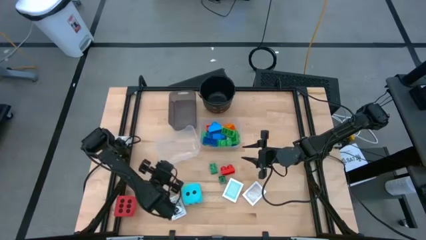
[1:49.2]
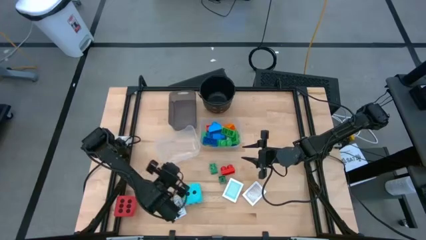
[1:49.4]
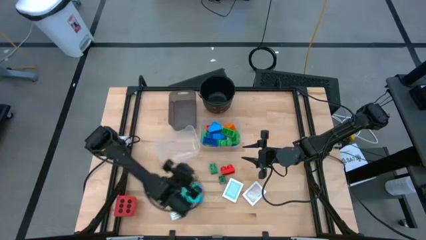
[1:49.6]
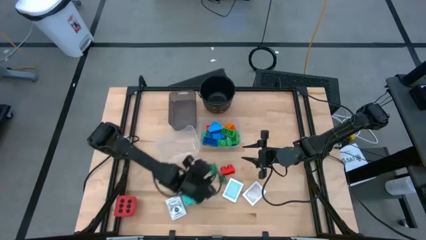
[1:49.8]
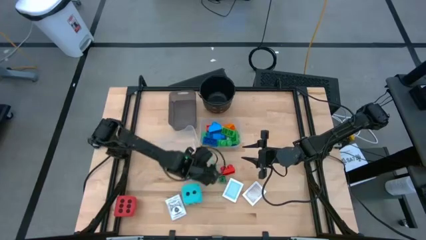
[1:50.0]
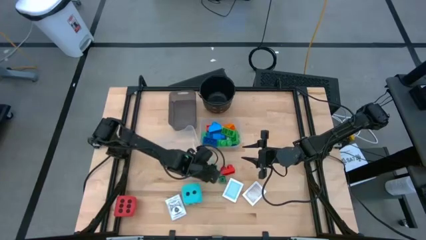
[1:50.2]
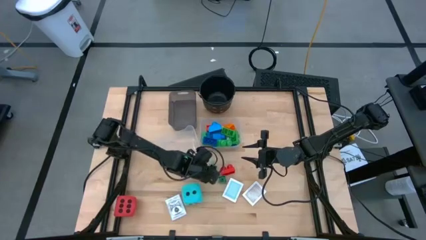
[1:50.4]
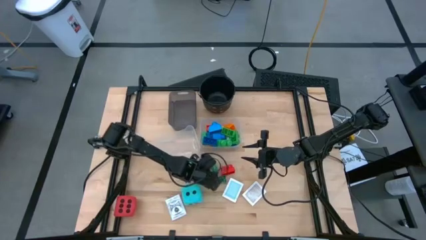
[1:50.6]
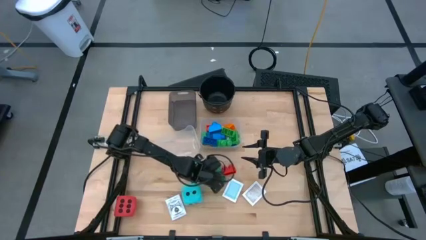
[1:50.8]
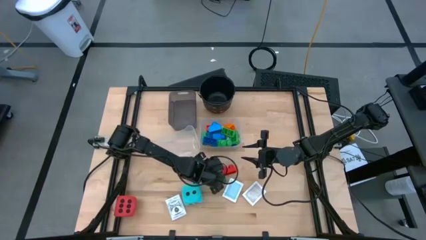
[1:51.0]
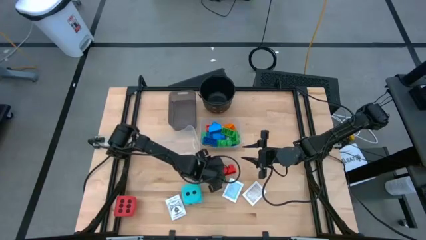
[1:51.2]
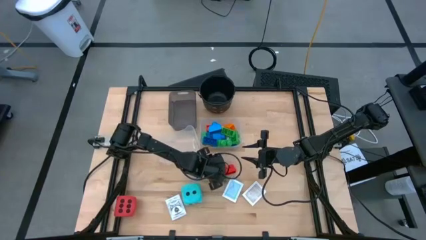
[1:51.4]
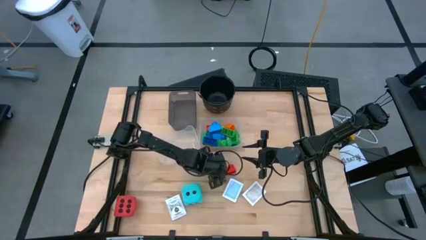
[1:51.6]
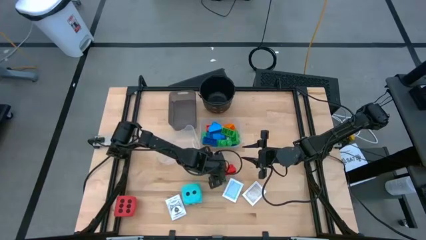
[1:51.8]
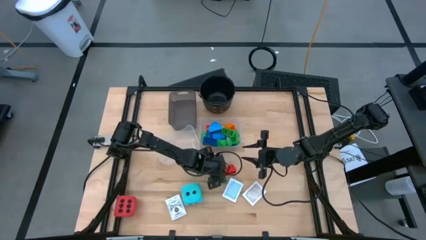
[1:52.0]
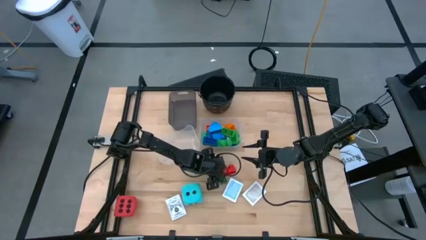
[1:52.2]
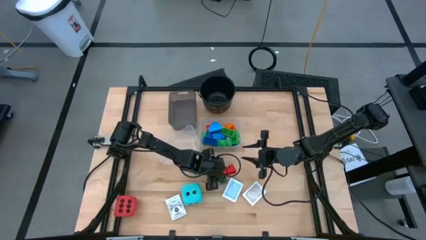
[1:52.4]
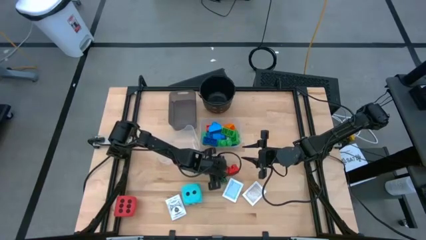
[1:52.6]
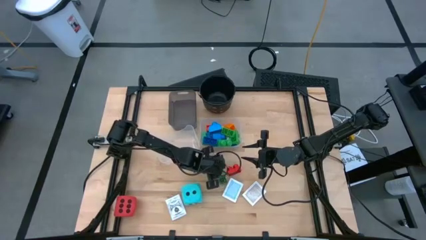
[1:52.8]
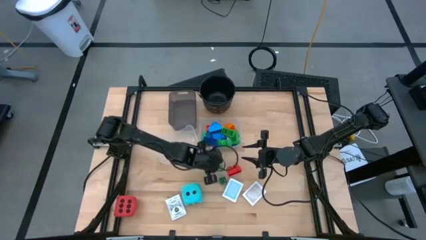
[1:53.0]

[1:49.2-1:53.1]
Task: Pick & Place Toys
Put the green game piece into the right transparent bin

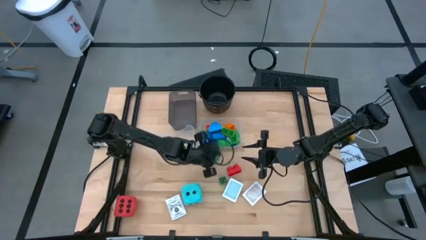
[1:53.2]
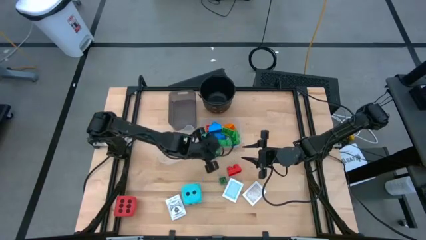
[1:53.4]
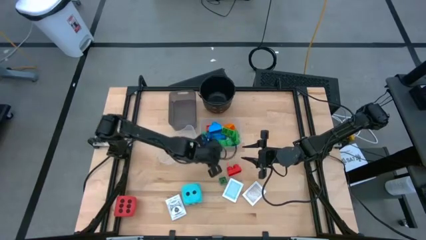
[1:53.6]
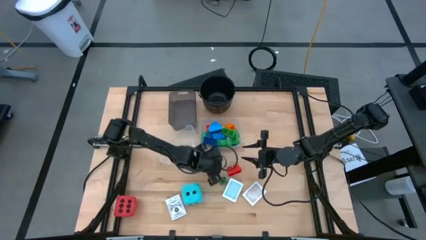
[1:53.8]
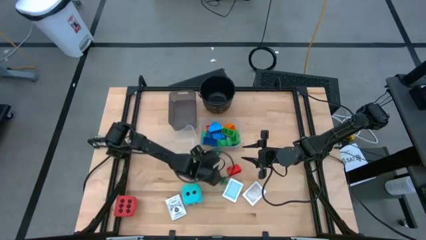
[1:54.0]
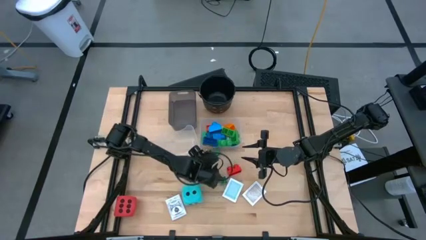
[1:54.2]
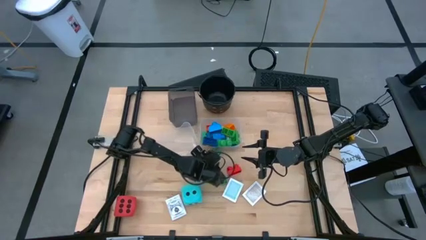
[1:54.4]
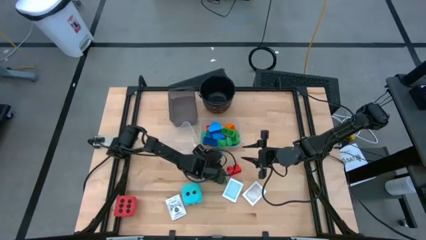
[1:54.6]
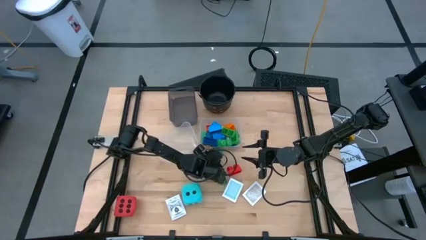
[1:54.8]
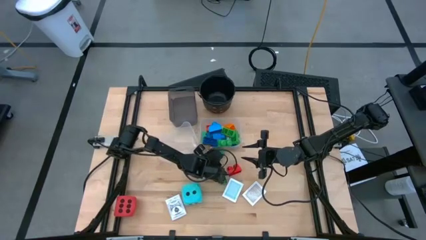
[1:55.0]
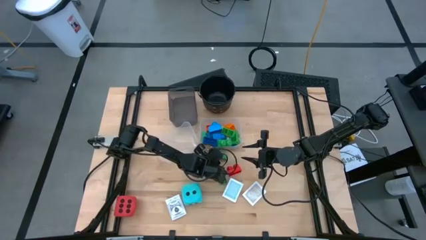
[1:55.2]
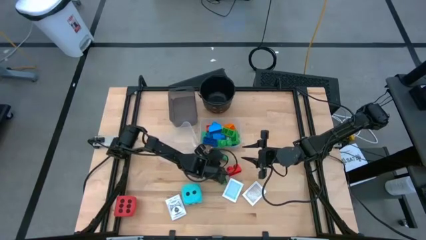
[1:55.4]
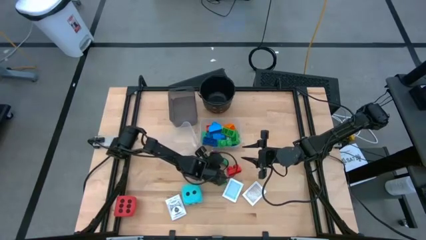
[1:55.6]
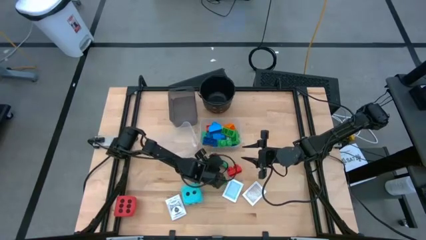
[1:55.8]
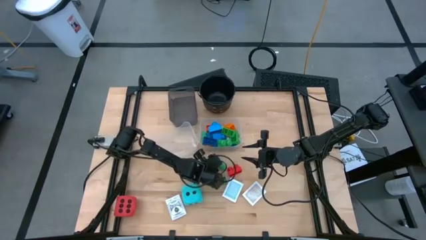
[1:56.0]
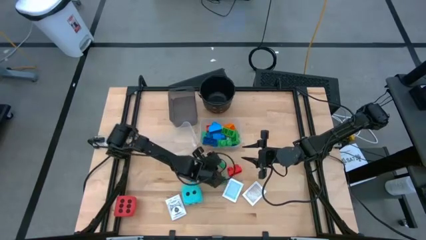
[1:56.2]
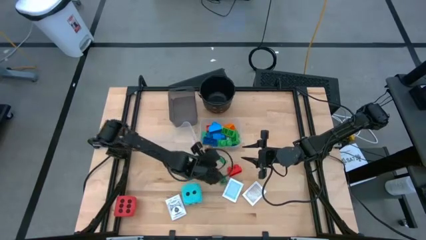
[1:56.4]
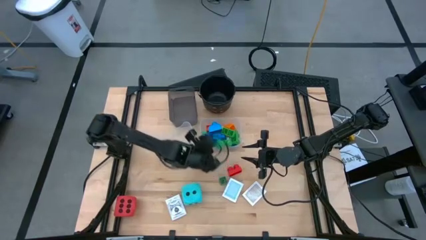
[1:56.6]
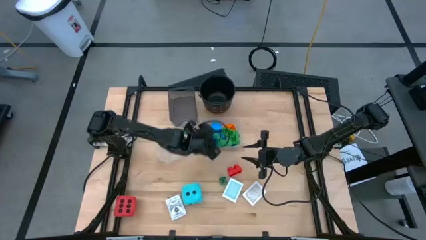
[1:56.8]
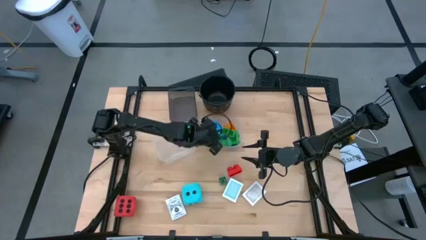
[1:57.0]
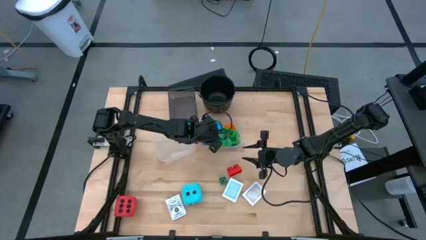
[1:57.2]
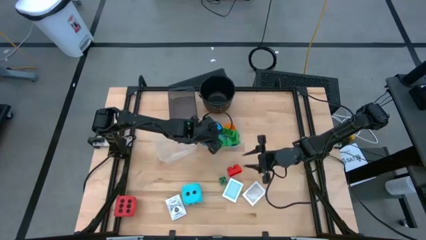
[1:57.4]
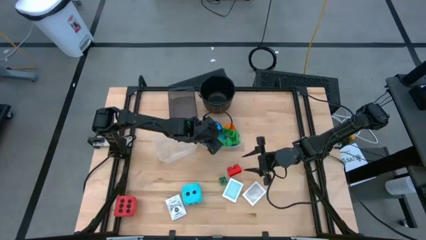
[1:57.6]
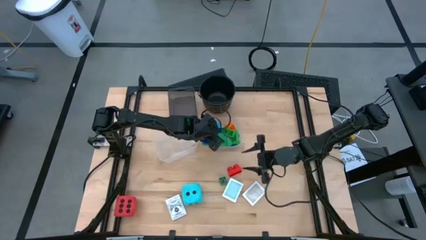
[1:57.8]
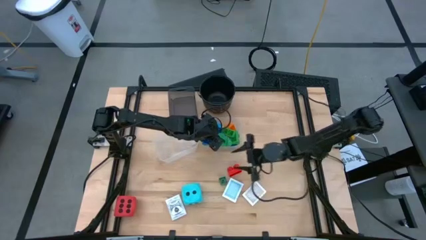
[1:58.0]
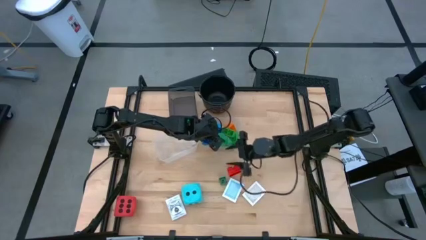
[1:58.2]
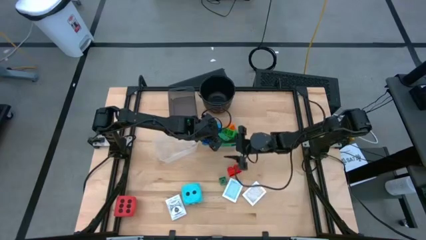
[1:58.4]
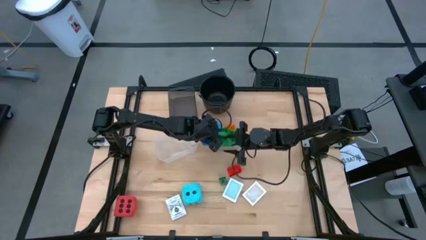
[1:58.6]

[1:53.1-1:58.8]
Put the green game piece into the right transparent bin

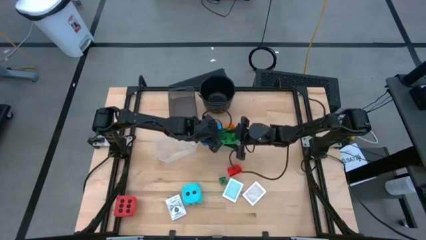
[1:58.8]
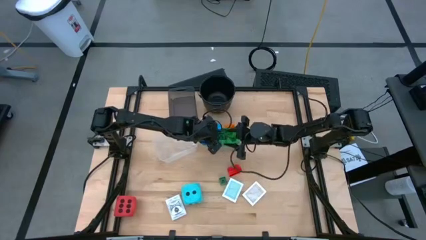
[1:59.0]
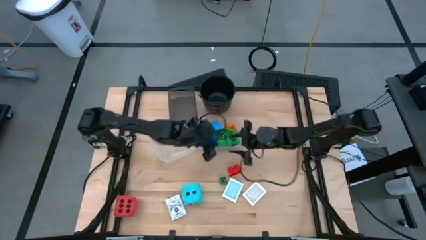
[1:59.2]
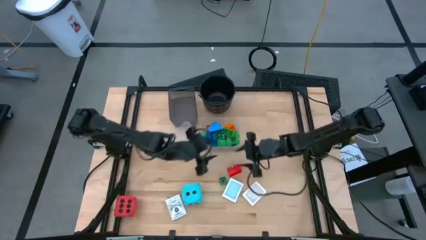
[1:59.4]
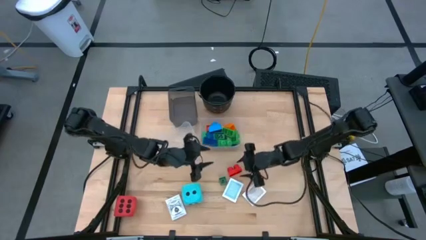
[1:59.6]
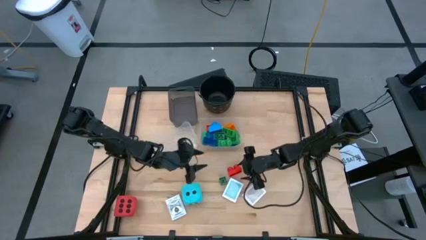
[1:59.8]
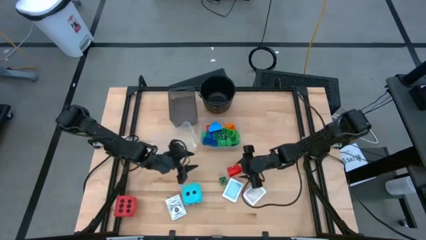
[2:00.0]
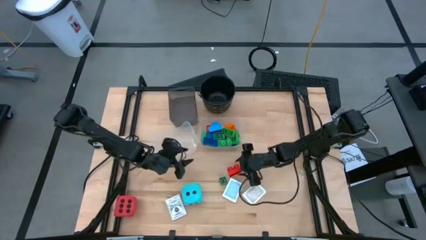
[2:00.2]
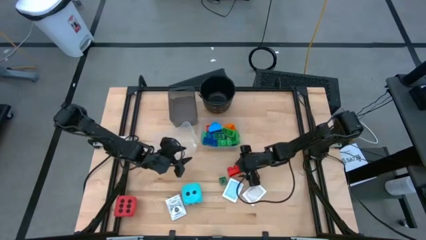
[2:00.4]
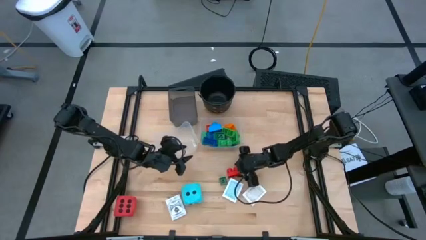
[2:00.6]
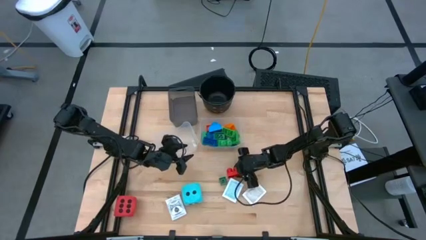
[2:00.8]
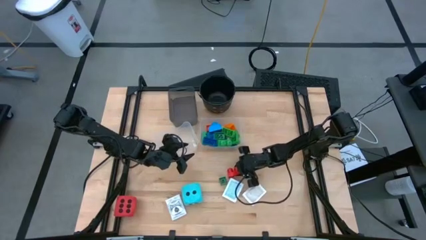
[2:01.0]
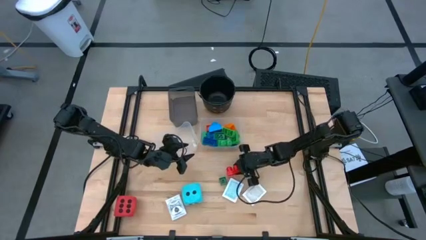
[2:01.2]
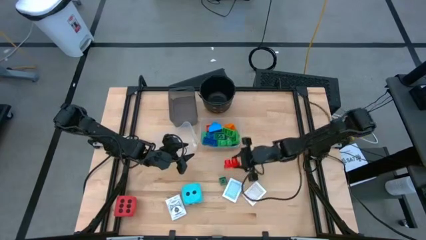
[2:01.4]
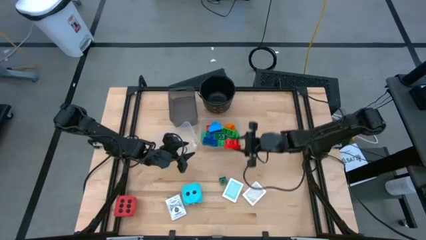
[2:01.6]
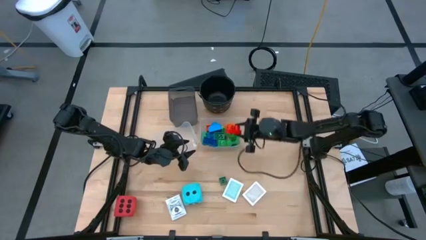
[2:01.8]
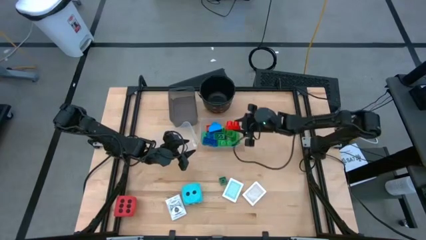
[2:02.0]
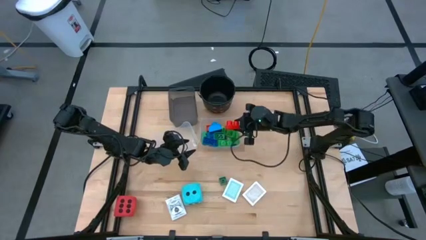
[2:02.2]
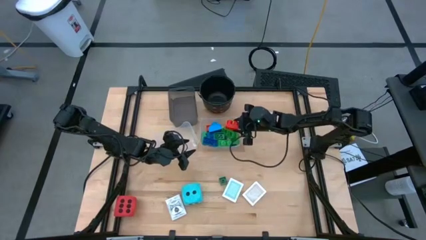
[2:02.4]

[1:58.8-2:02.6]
Put the red game piece into the right transparent bin

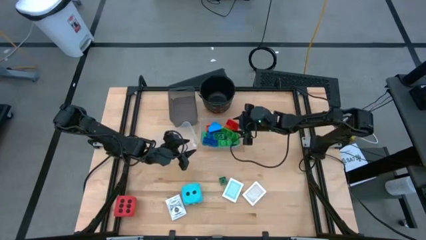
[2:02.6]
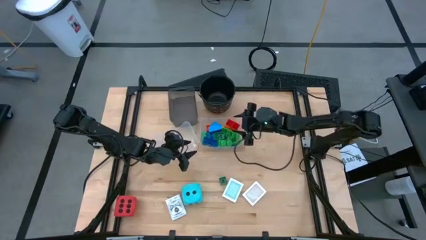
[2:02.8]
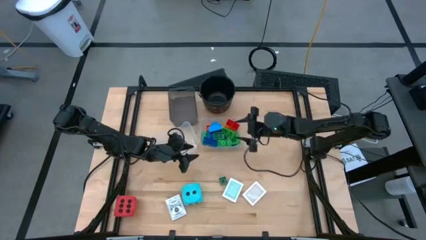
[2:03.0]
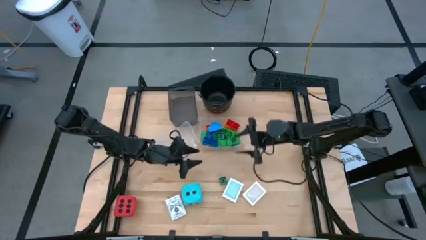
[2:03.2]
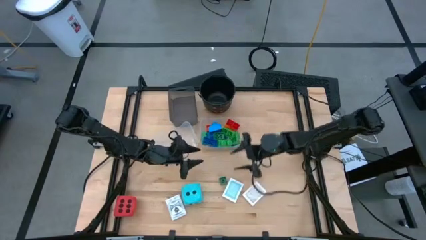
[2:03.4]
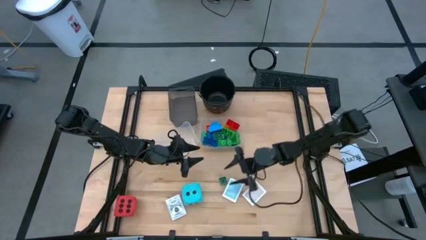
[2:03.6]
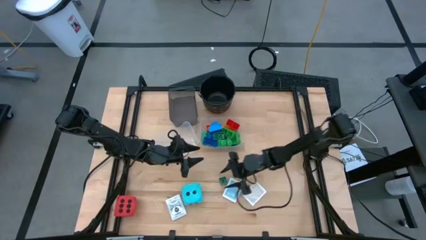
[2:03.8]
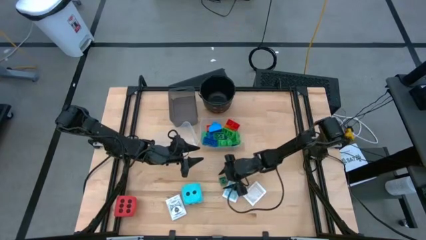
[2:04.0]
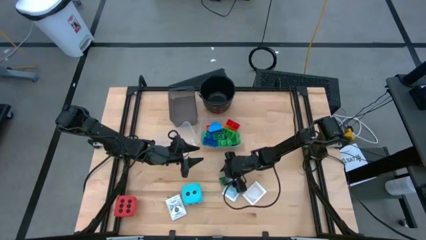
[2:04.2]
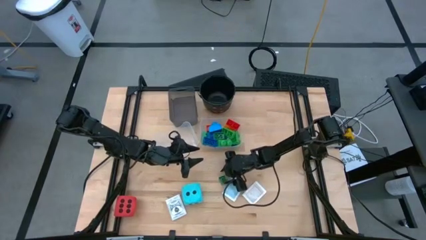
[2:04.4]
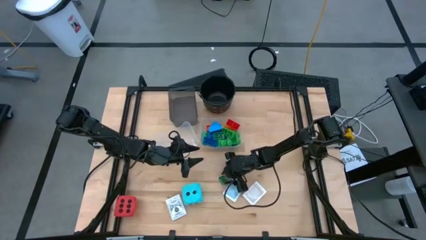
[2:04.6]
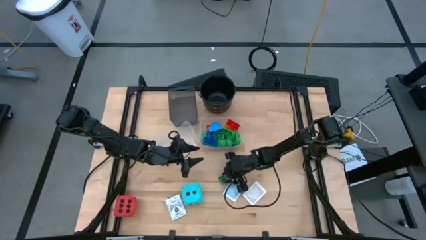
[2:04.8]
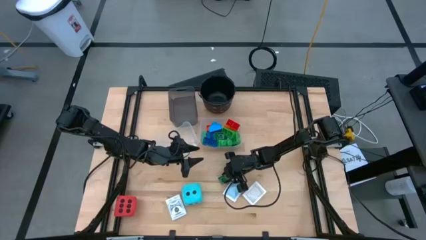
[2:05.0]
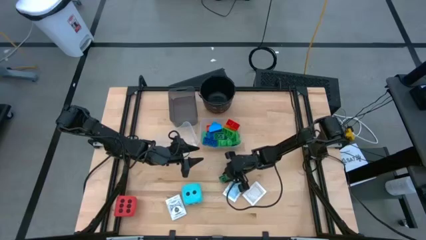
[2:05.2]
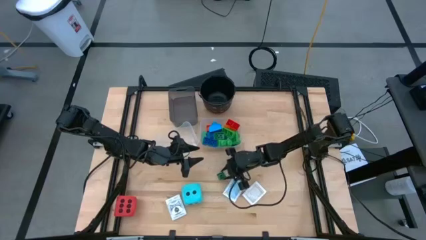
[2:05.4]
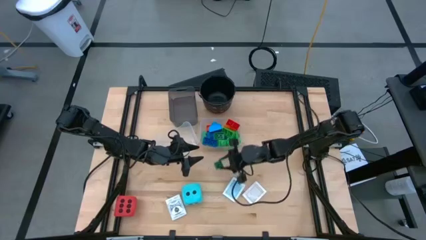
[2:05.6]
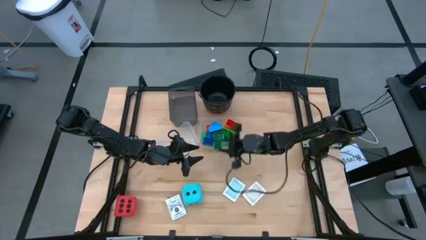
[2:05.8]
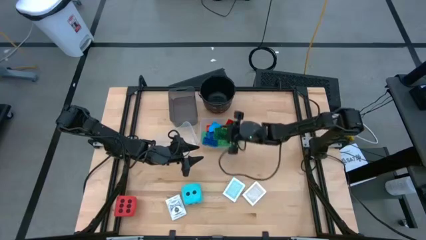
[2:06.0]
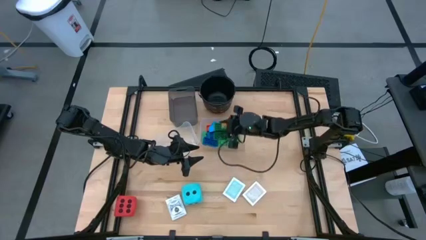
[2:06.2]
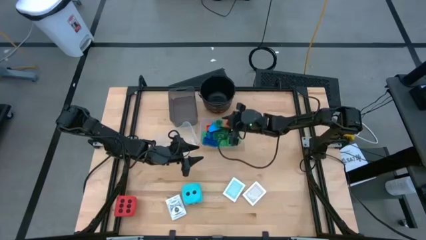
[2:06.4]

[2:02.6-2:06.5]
Put the green game piece into the right transparent bin
